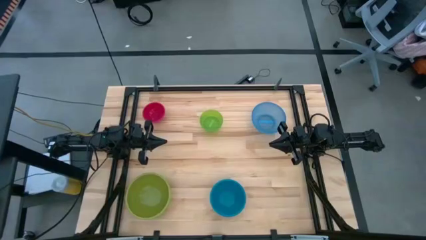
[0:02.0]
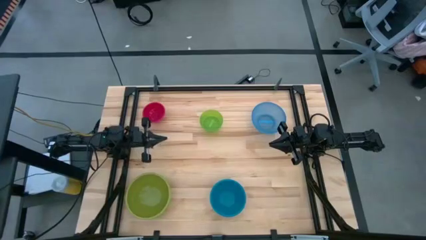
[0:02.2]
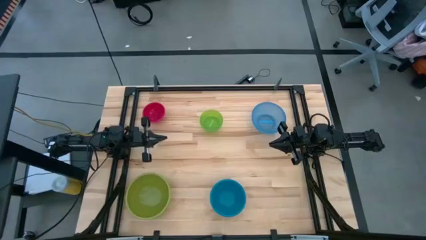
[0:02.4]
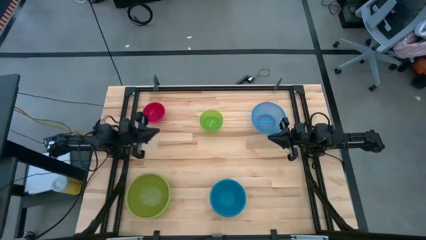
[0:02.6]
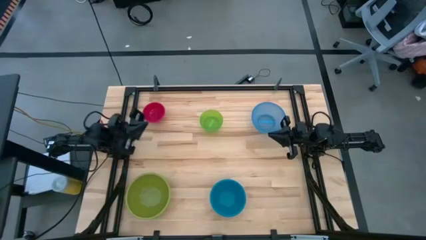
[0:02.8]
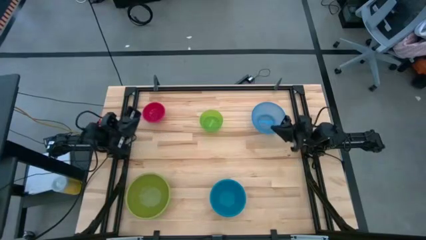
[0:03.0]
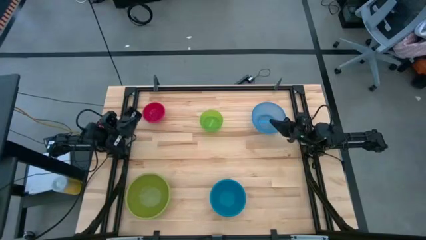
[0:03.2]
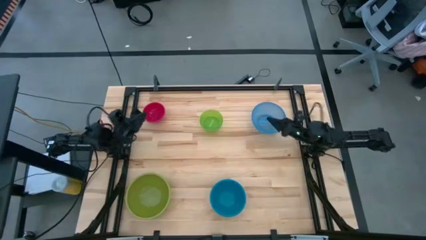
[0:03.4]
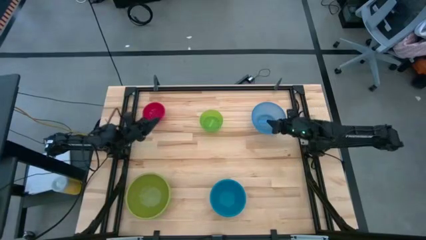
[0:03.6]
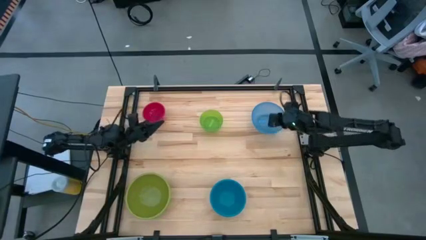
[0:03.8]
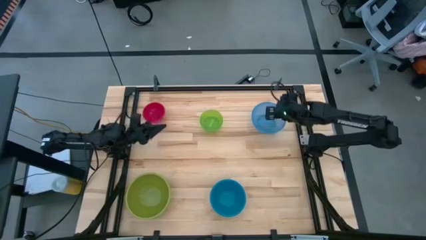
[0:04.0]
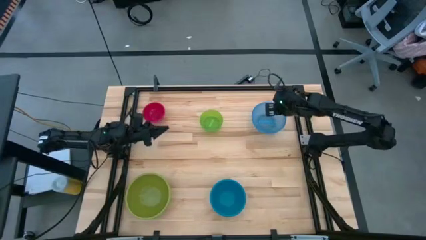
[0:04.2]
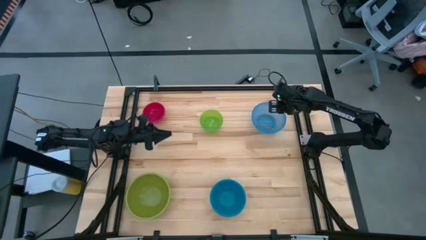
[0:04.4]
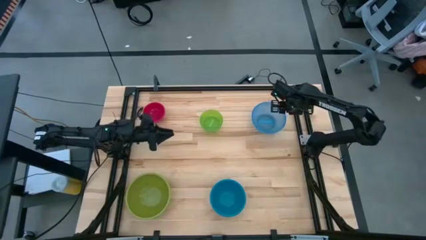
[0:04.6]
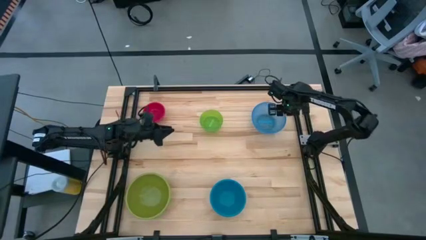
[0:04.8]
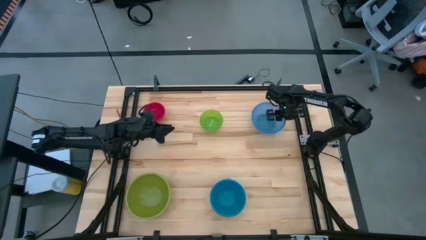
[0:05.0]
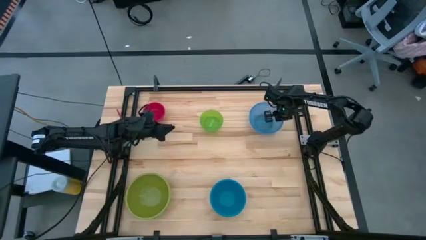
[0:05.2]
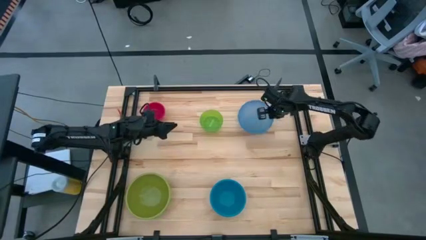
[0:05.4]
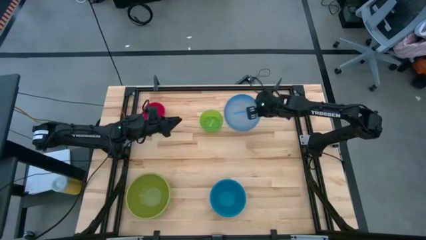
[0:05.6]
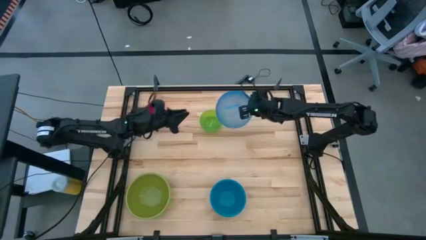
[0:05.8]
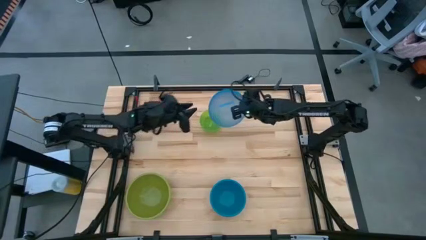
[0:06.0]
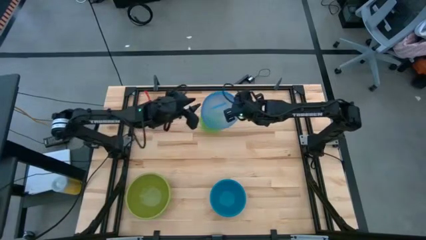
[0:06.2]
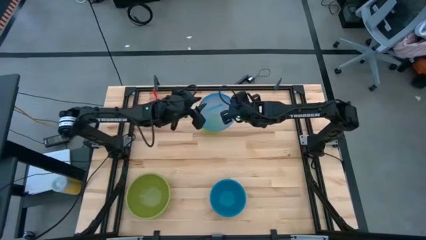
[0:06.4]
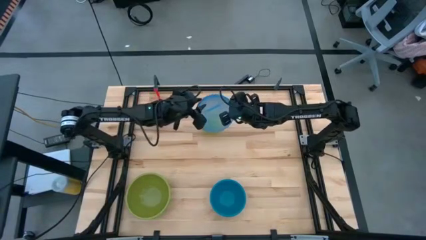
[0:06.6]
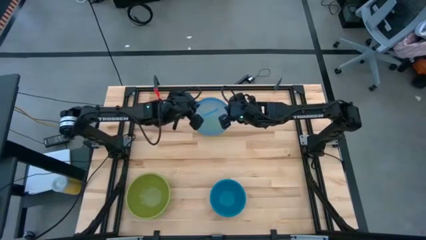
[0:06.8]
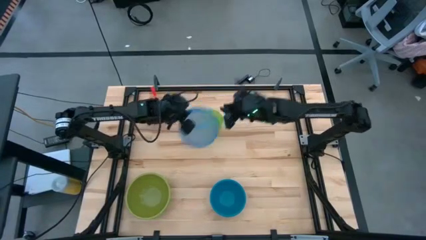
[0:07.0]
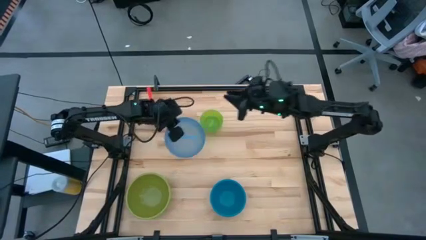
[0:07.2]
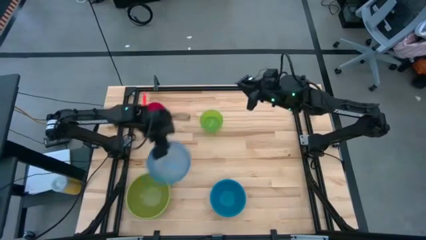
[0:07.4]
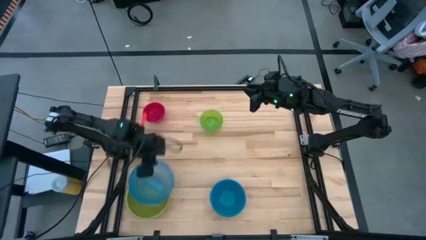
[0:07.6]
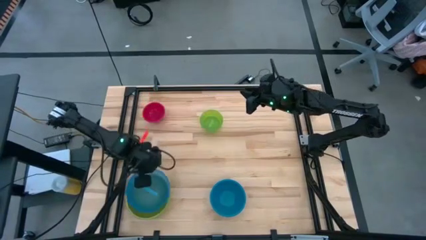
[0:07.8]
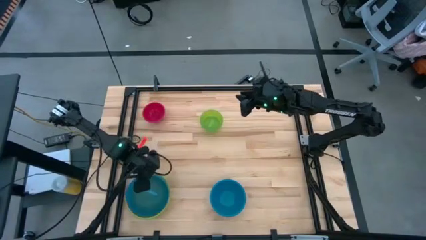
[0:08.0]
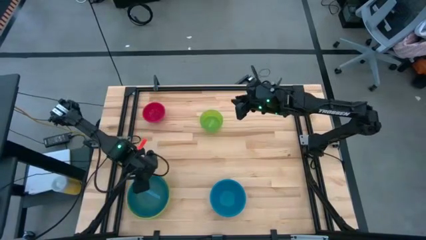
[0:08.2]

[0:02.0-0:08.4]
Stack the light blue bowl into the dark green bowl

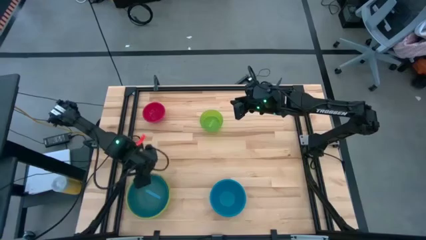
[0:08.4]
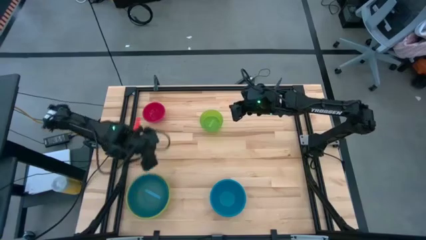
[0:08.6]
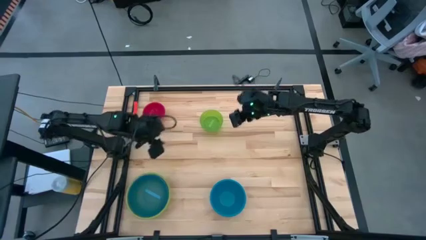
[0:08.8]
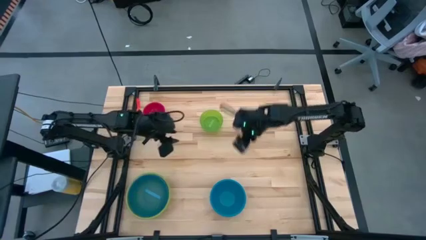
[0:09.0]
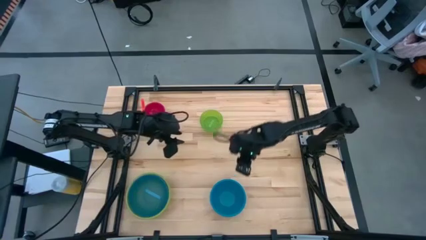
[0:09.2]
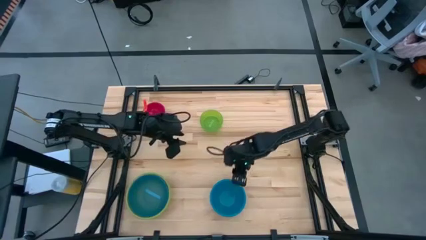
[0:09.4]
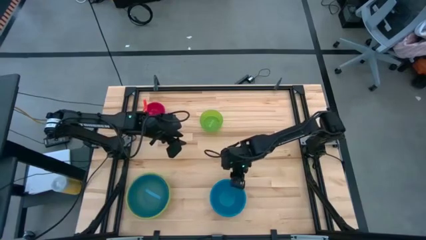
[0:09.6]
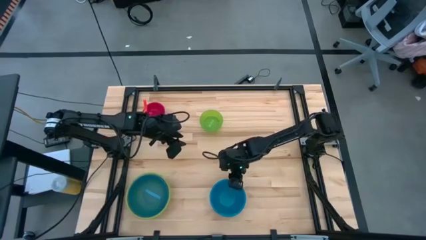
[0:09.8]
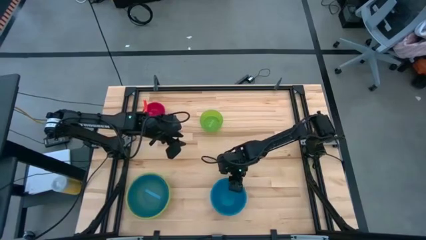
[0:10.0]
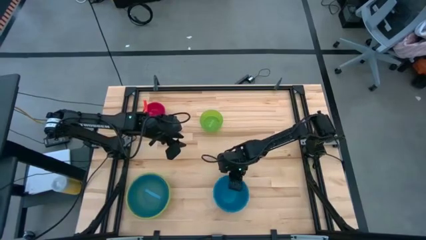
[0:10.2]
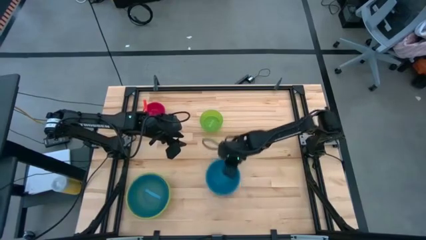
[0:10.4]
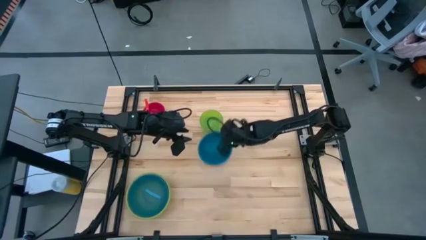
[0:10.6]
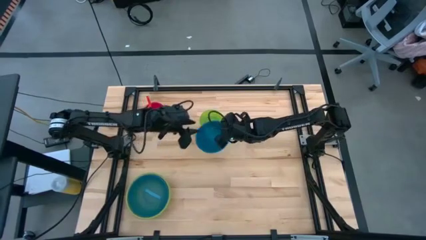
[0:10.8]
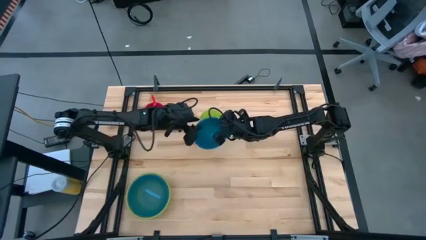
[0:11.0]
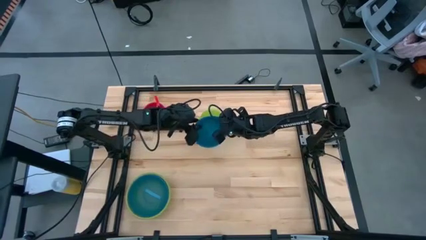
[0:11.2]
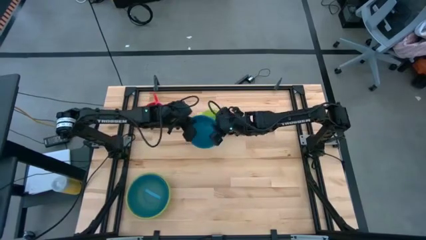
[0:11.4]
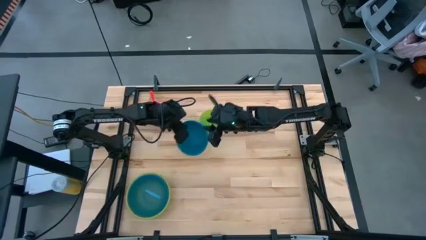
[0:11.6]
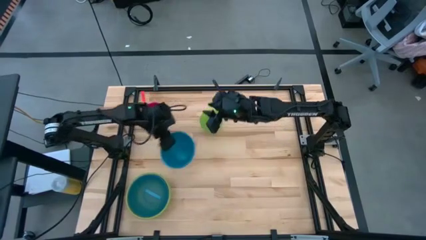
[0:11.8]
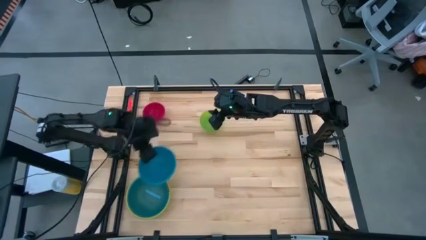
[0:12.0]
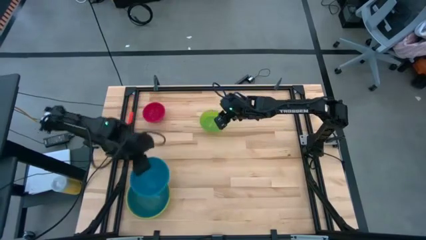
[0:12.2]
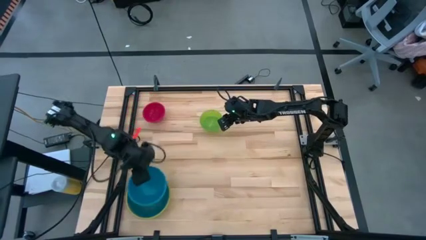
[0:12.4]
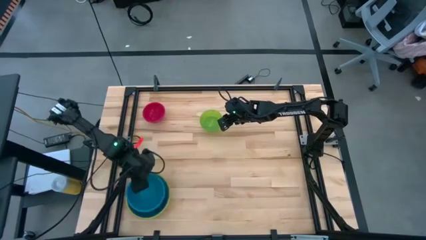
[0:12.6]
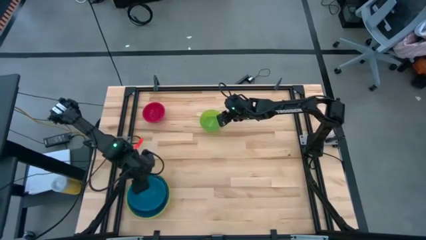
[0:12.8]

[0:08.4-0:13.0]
Stack the blue bowl into the light blue bowl

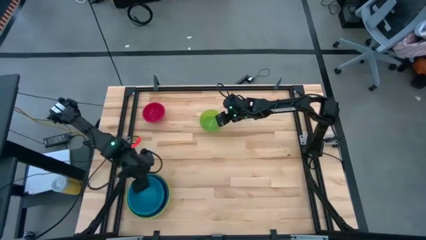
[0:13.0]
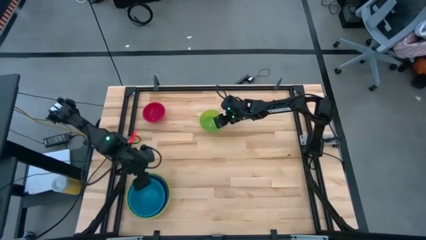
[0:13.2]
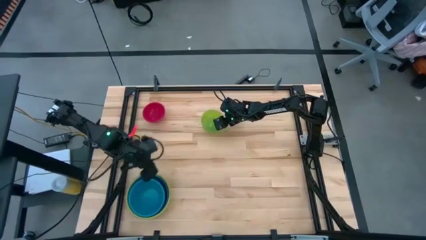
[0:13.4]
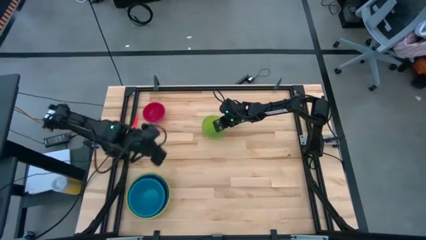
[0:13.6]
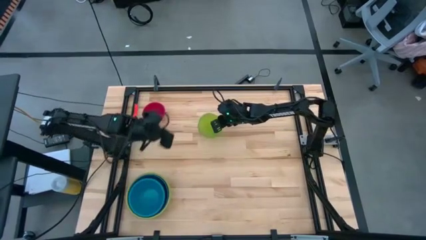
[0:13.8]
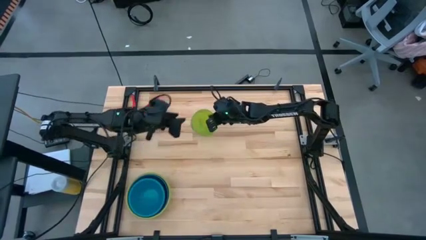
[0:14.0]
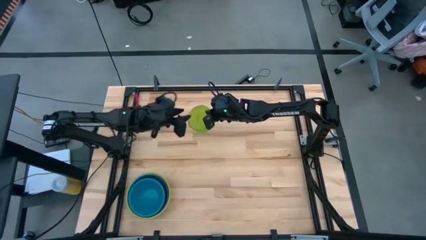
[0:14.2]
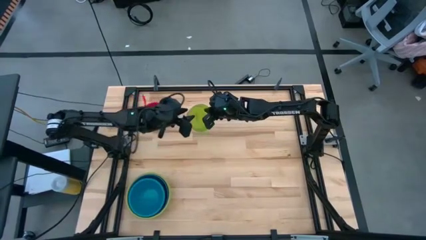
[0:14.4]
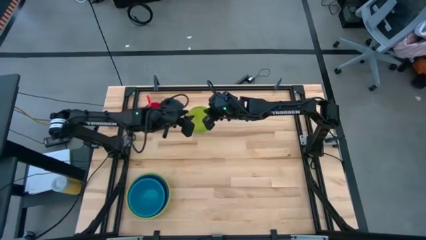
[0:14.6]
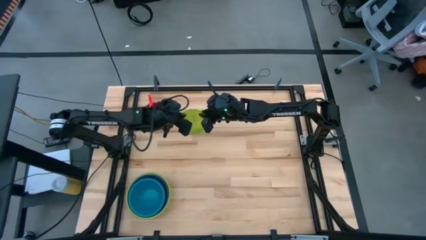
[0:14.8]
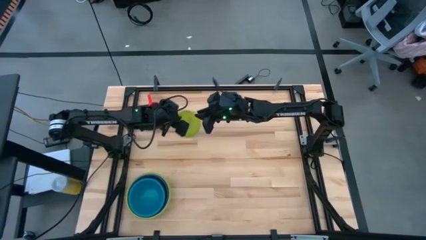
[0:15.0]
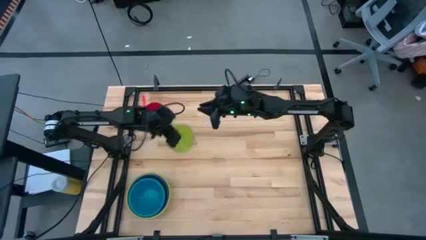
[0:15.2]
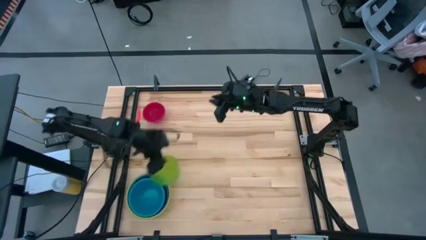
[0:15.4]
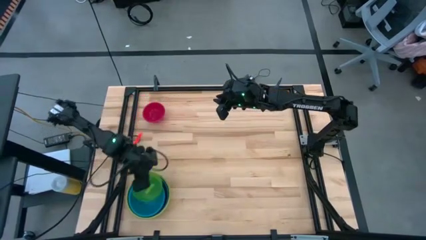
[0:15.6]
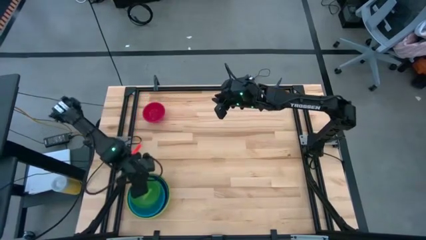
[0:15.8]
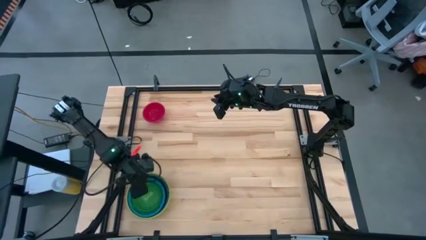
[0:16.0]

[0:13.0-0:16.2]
Stack the light green bowl into the blue bowl

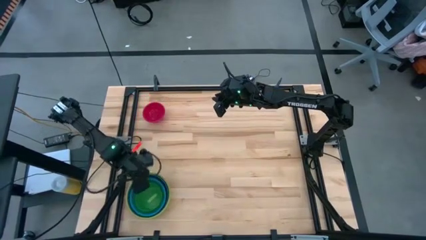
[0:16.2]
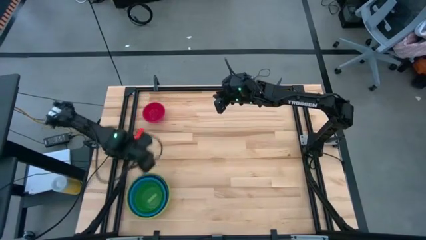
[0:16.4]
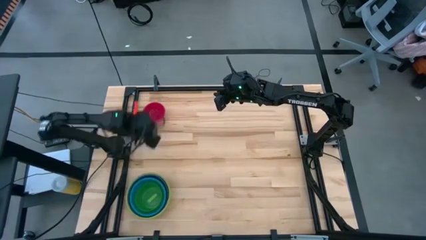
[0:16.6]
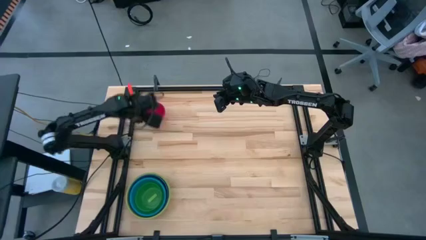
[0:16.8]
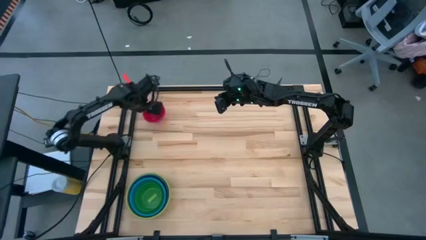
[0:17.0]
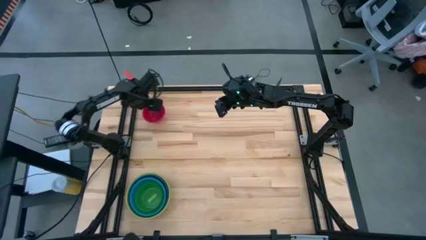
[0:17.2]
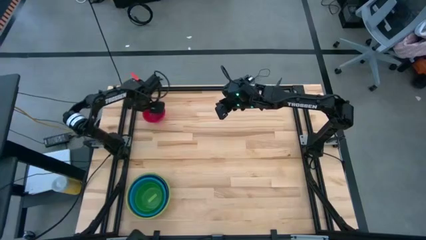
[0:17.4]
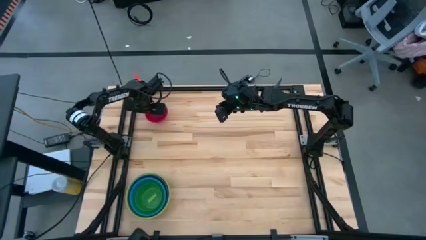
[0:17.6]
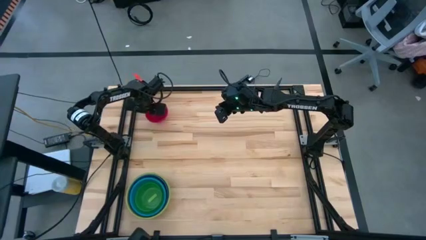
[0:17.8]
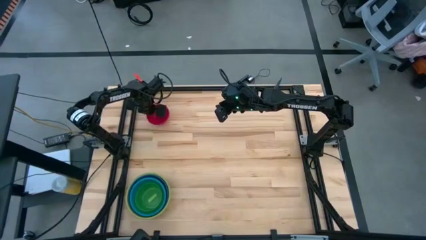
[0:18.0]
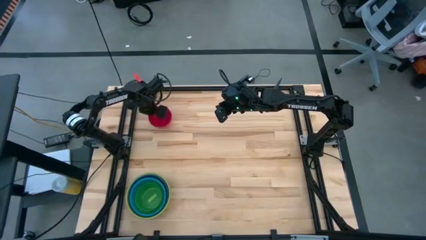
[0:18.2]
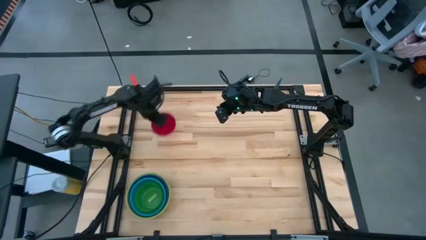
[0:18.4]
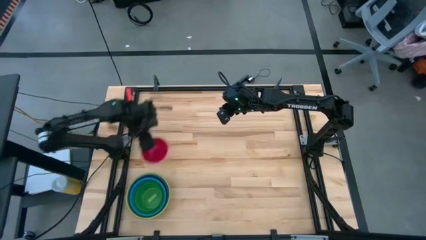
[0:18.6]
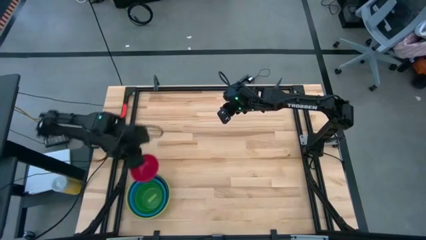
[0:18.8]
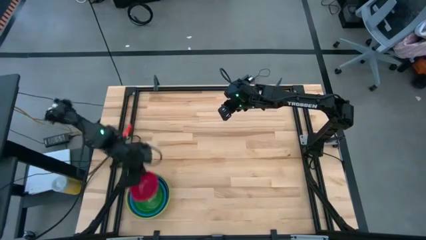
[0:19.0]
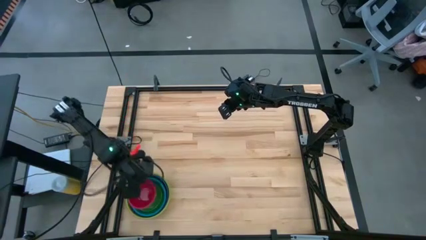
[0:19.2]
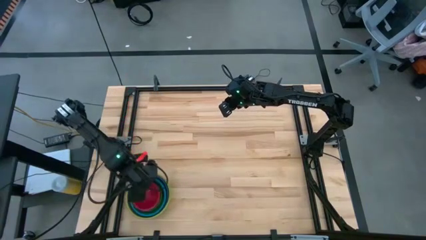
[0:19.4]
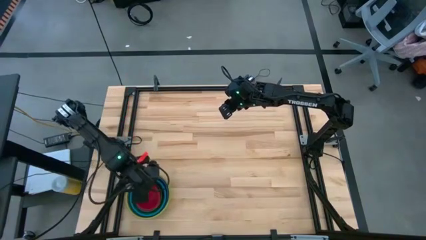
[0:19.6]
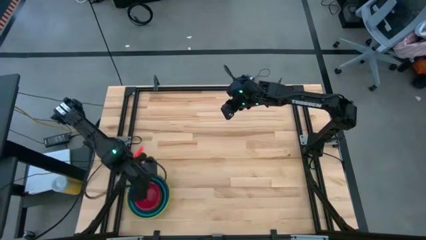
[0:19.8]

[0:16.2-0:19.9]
Stack the pink bowl into the light green bowl
